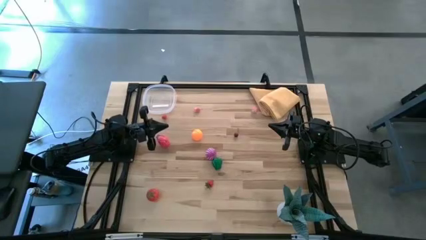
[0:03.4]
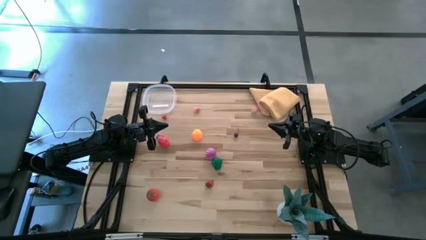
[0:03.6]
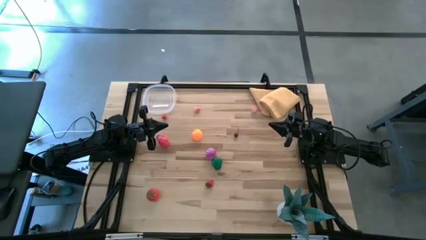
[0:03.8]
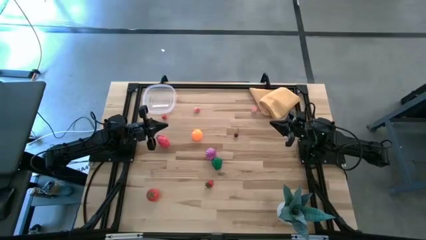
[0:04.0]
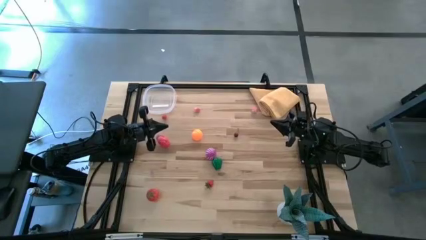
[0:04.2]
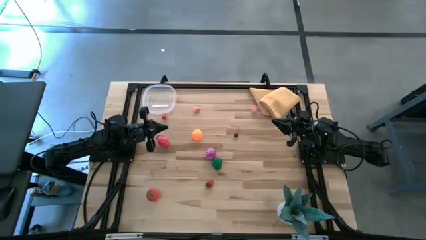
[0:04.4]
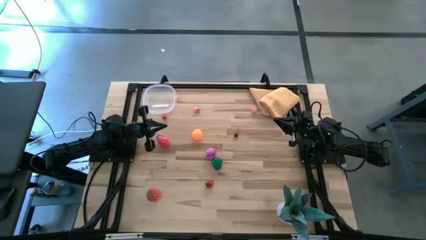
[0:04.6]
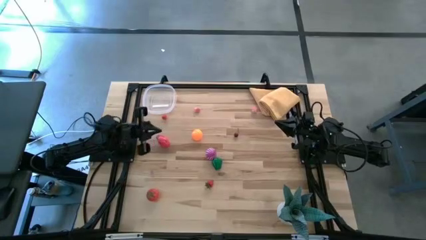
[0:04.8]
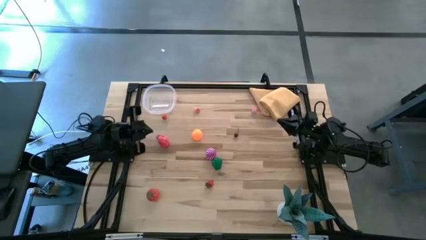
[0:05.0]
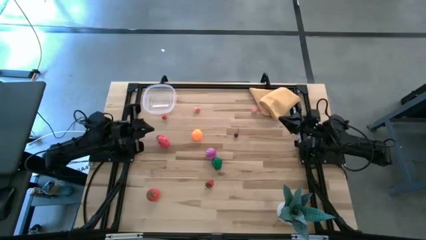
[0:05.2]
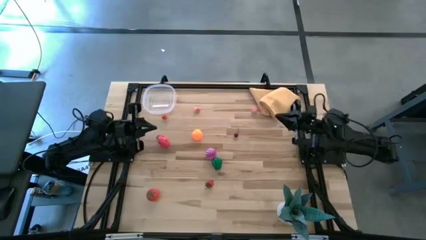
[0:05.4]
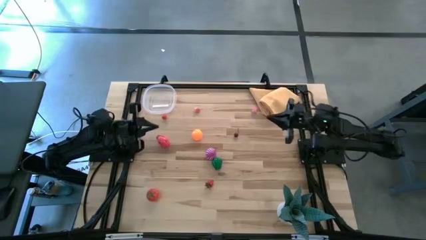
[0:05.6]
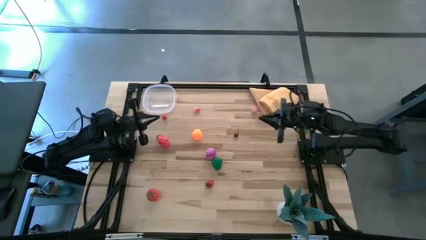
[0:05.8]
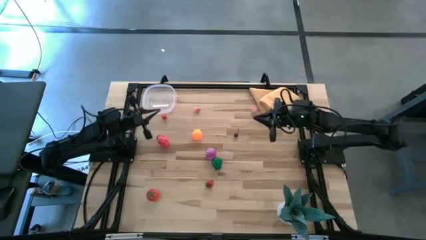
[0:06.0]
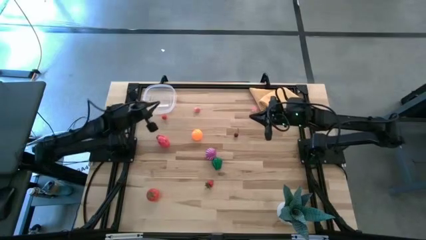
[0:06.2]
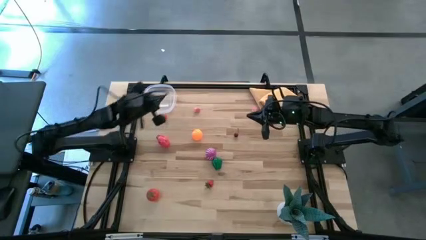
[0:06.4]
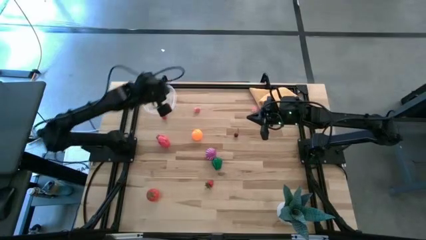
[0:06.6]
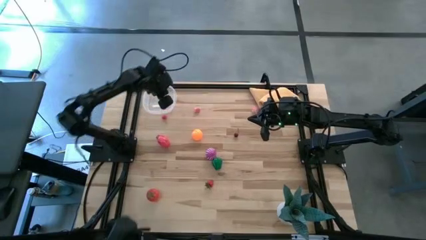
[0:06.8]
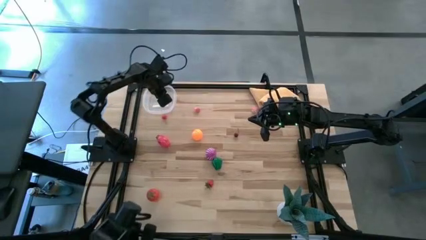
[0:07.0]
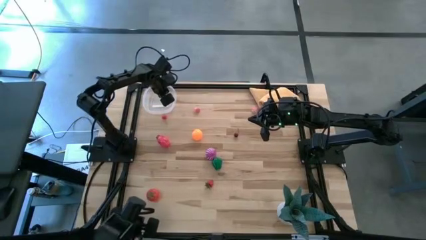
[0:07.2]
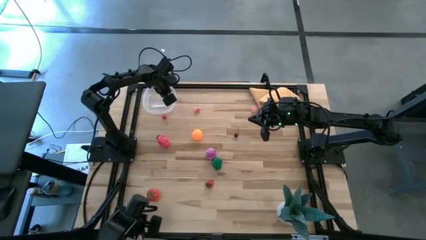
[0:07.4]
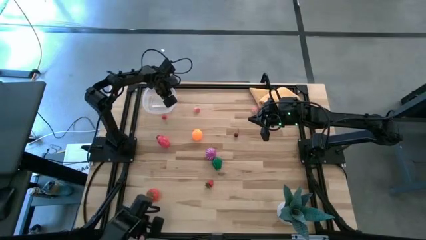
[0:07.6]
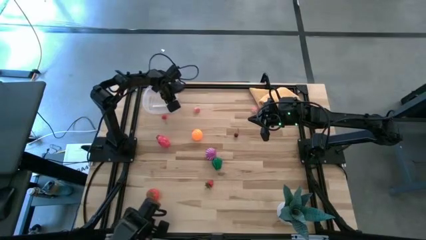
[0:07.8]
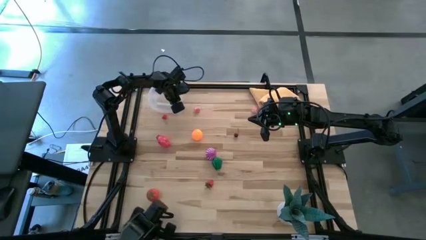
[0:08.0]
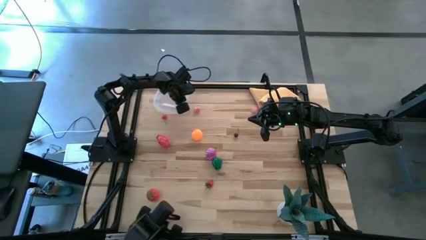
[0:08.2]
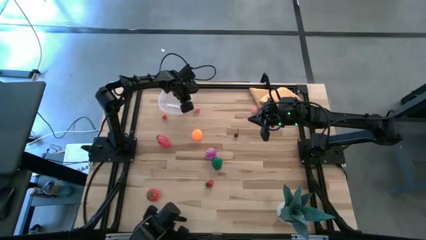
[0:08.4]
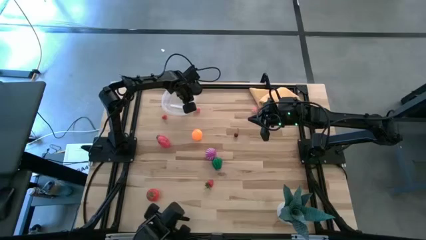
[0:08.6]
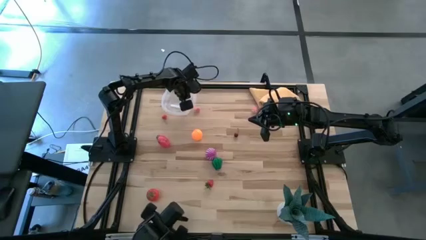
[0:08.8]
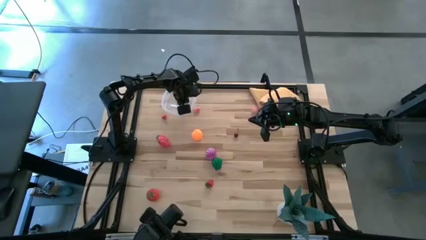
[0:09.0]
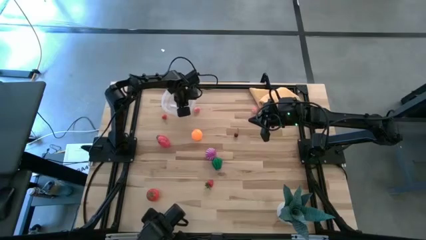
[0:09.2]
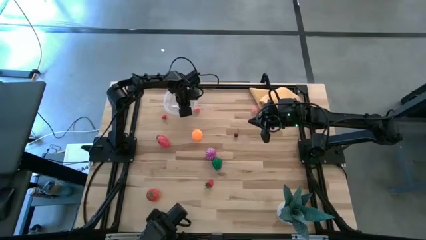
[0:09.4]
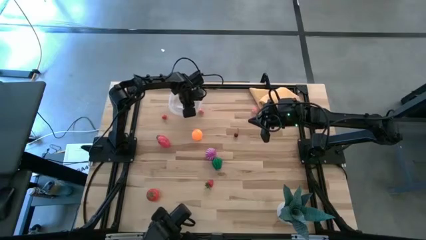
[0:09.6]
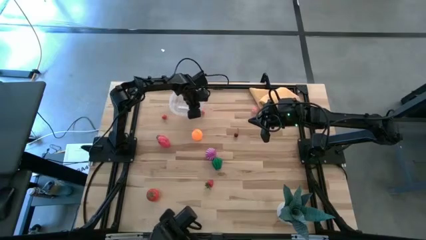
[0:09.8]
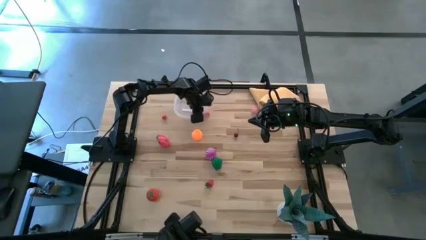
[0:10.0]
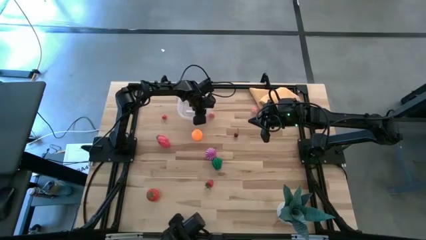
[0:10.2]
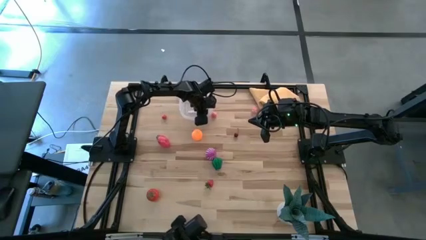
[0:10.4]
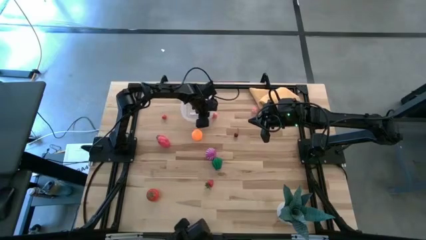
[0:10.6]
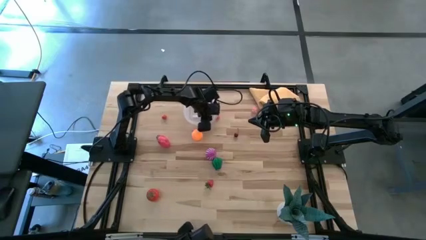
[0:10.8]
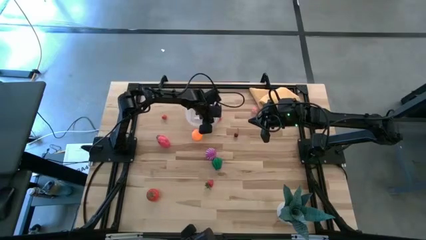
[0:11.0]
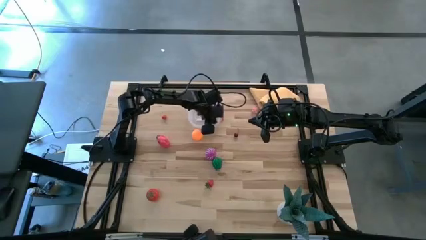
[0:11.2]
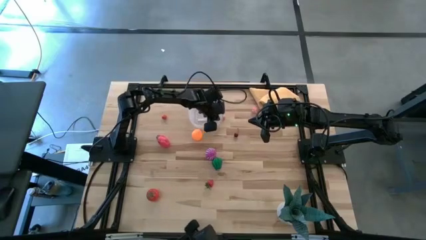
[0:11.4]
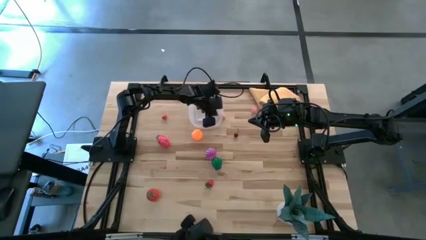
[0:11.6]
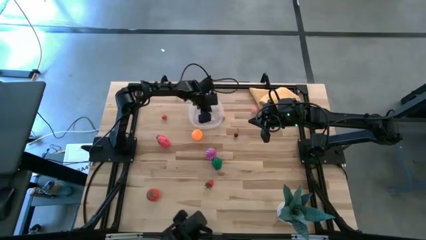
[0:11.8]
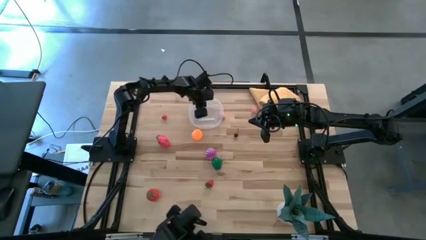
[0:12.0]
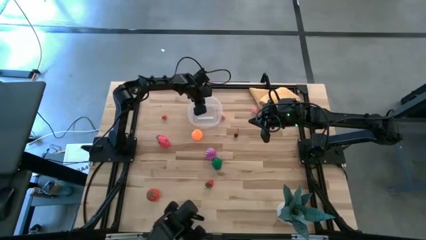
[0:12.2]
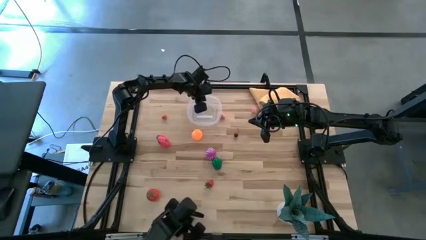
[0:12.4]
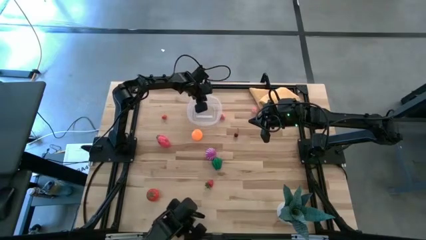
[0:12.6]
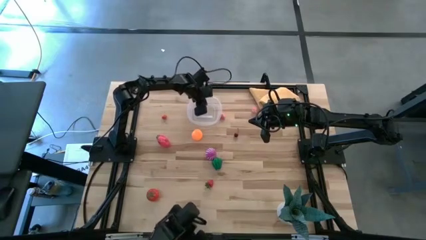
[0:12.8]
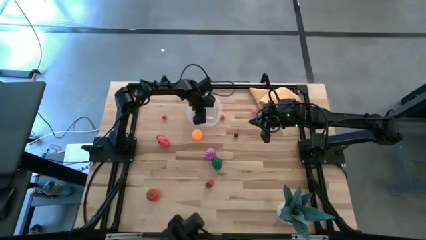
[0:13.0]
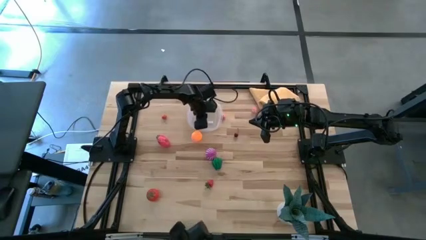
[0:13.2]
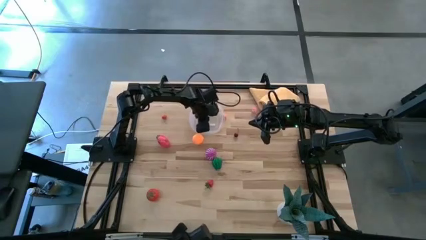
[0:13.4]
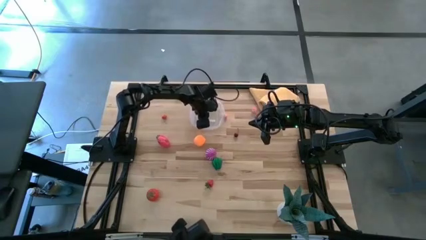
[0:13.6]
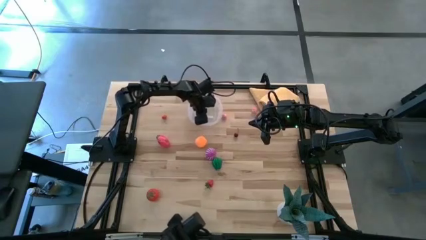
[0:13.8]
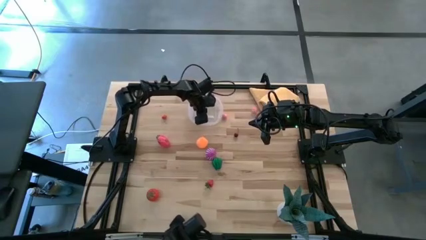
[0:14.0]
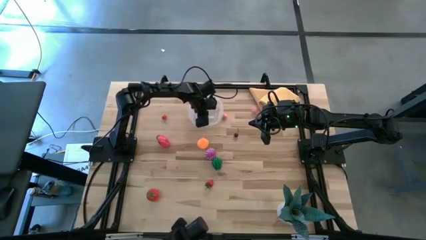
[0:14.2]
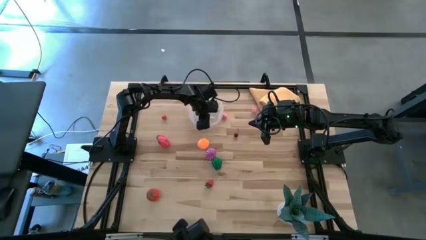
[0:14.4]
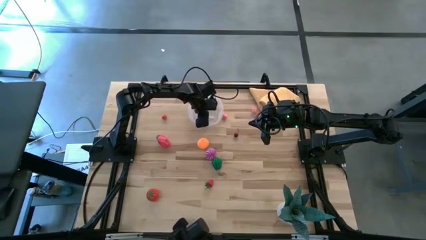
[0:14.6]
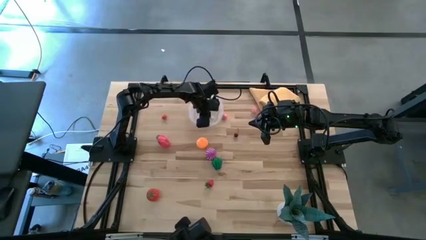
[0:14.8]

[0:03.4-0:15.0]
Task: Pick and placing Produce into tupperware
Prepare the transparent bin

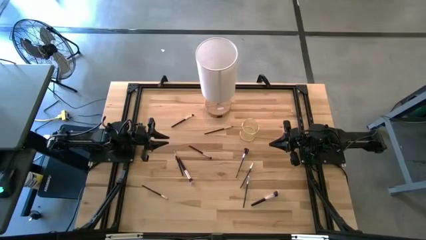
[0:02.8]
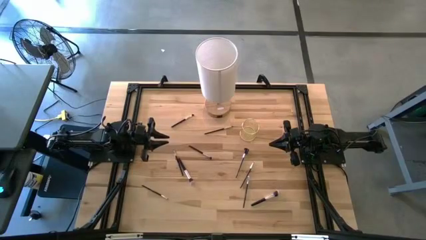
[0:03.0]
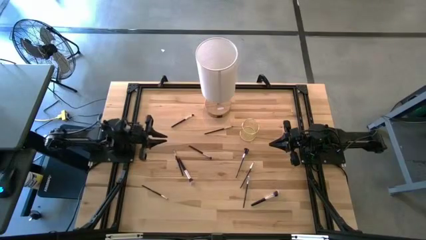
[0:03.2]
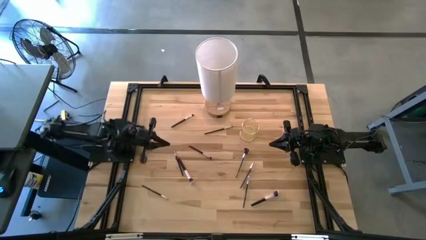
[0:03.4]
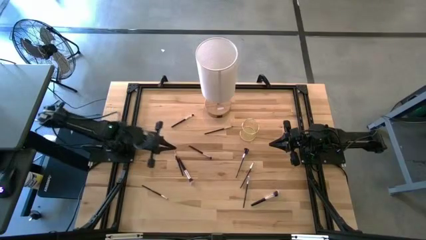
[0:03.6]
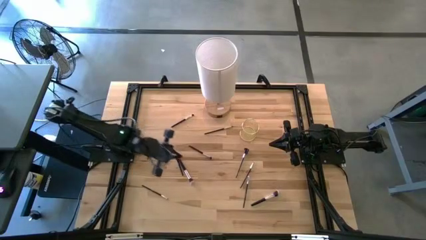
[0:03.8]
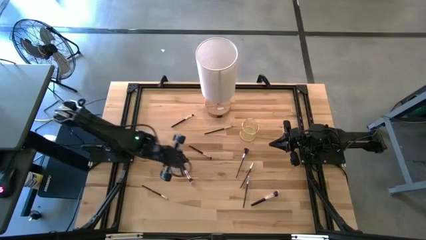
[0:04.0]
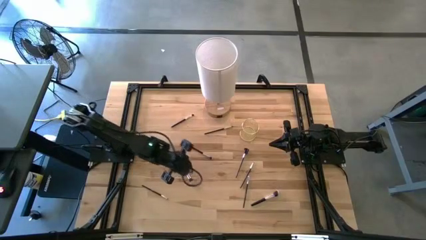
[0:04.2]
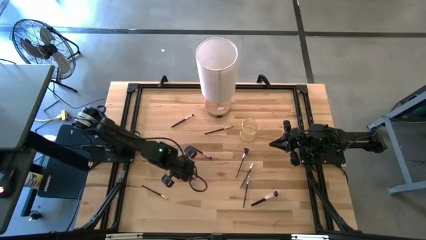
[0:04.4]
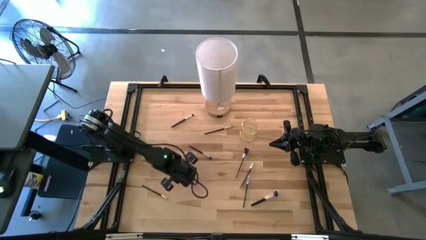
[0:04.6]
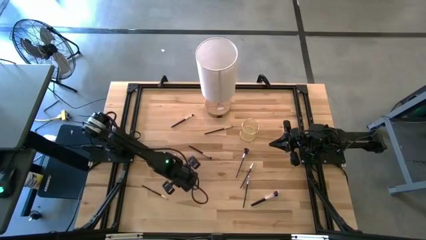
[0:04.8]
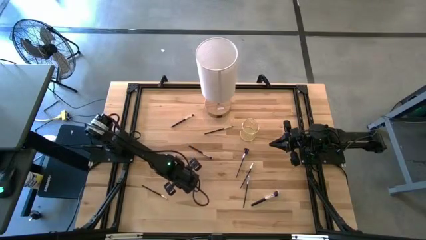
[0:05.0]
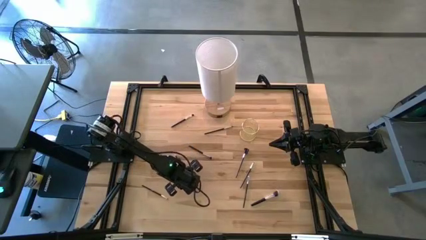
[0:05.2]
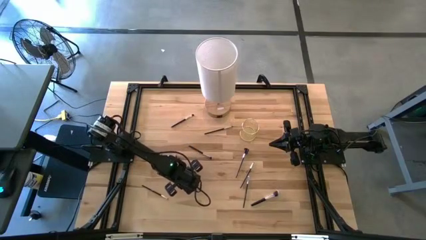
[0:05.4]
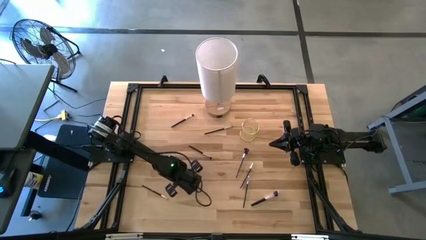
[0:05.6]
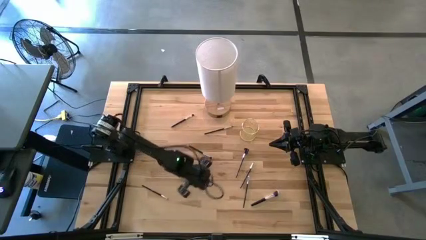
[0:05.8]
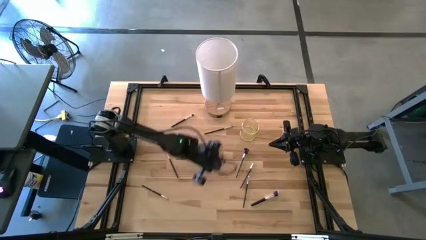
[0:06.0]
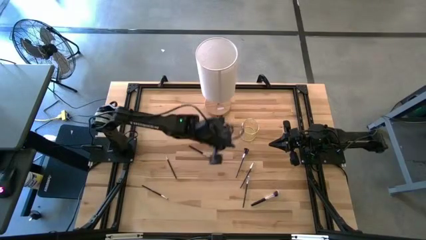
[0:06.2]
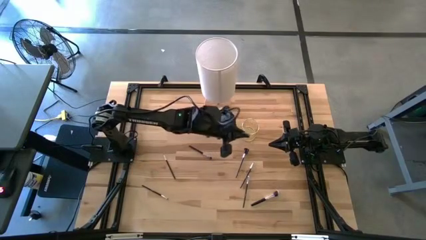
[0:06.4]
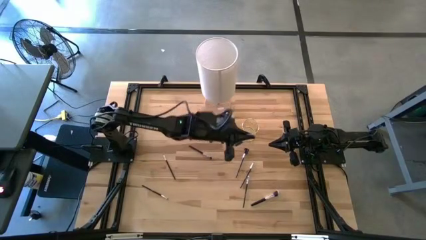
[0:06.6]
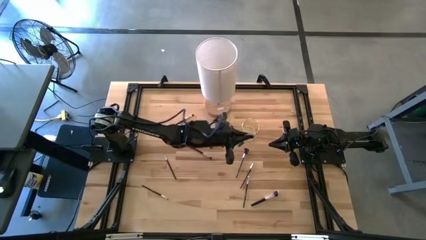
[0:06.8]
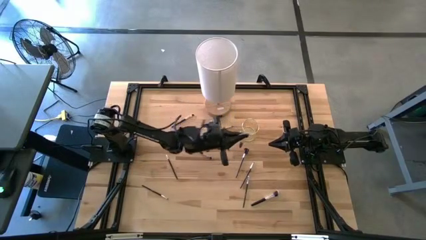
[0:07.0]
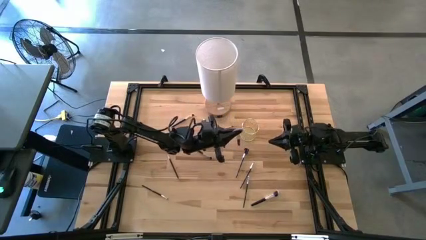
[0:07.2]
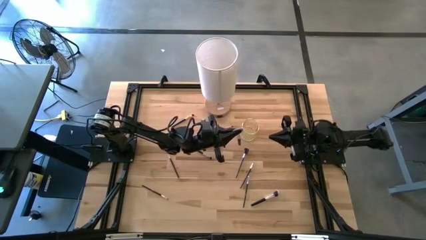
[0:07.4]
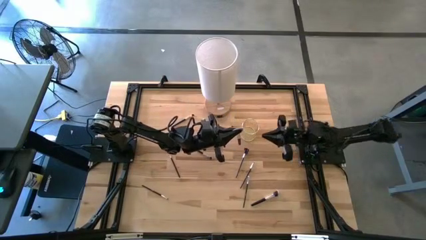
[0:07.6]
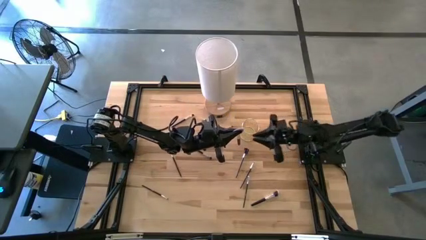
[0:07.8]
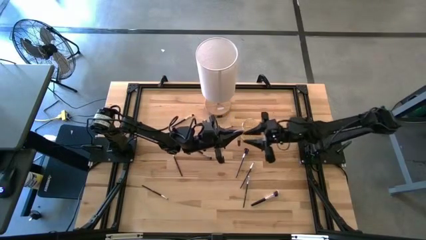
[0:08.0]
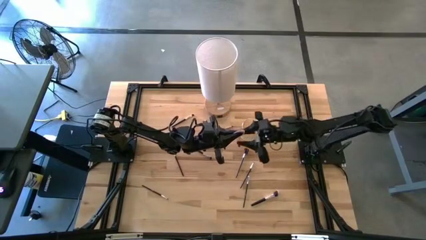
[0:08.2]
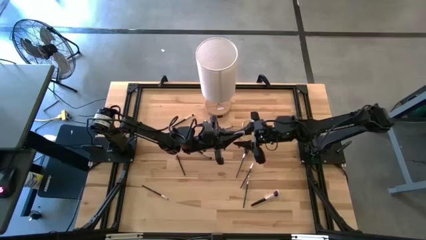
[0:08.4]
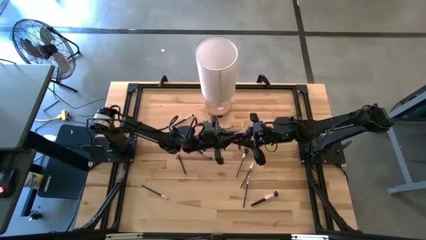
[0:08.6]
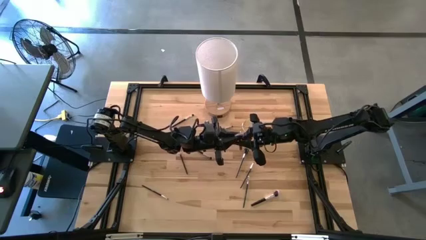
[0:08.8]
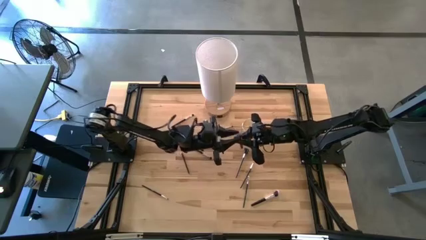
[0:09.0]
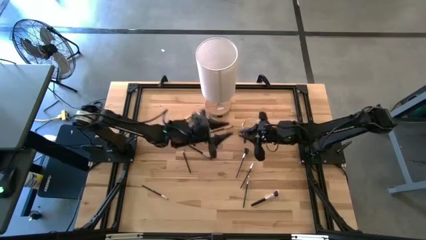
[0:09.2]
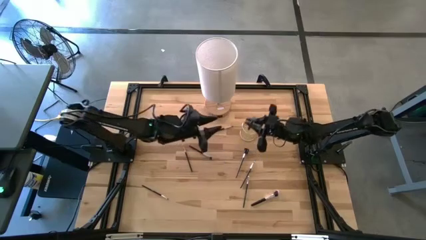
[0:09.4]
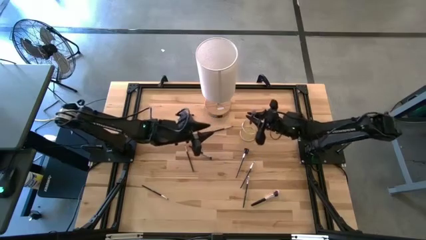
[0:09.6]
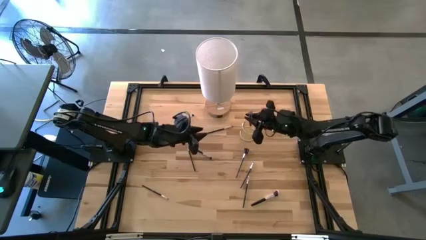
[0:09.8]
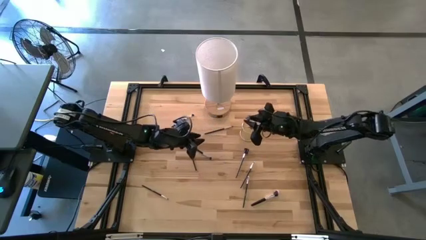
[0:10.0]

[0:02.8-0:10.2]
Task: Pick & Place Makeup Brushes
Put the black blush brush into the makeup brush holder
